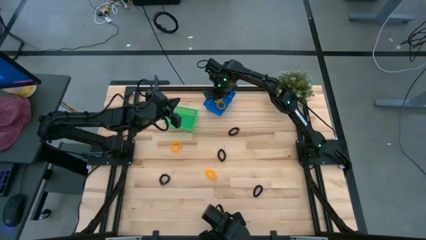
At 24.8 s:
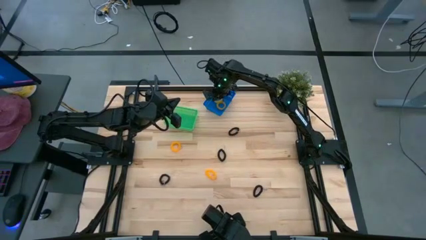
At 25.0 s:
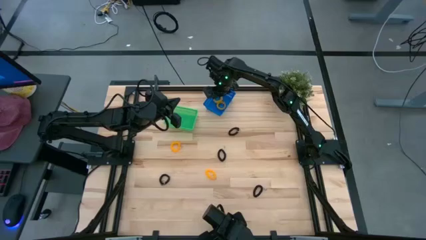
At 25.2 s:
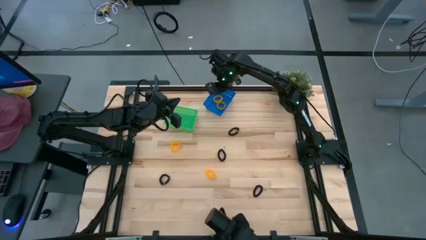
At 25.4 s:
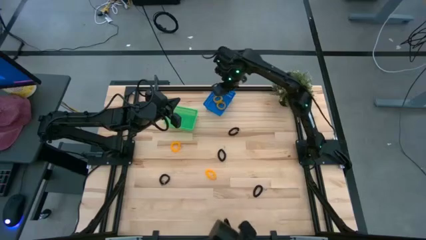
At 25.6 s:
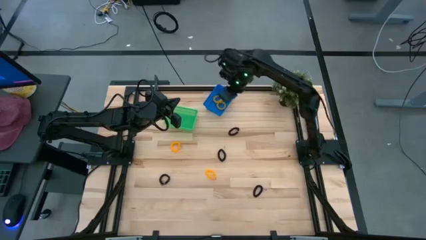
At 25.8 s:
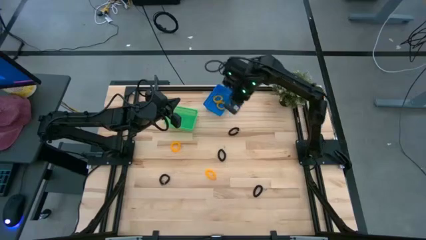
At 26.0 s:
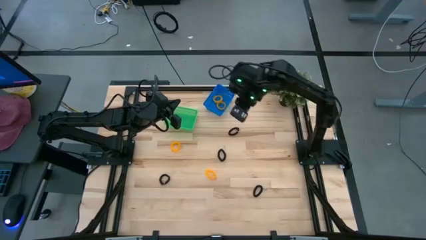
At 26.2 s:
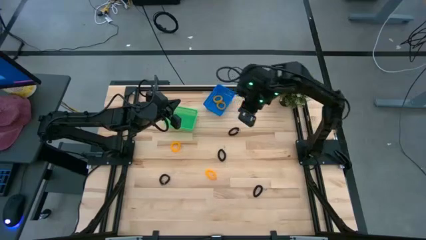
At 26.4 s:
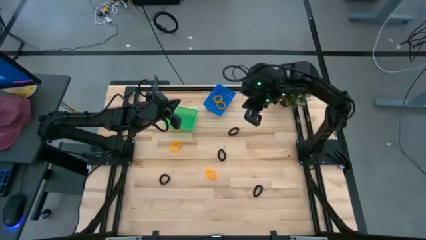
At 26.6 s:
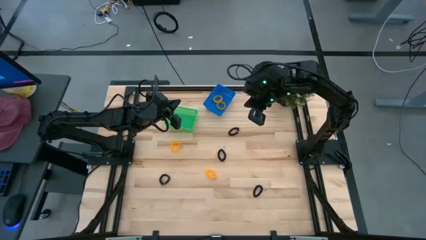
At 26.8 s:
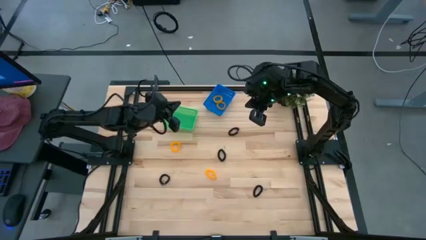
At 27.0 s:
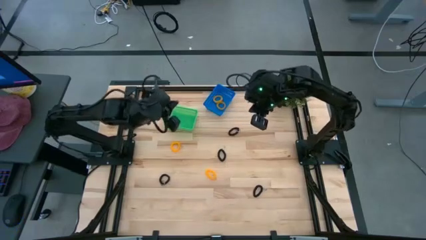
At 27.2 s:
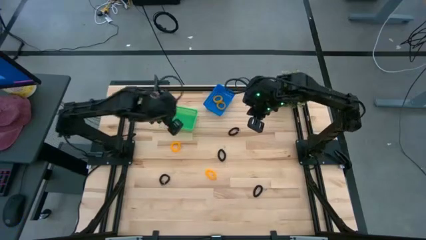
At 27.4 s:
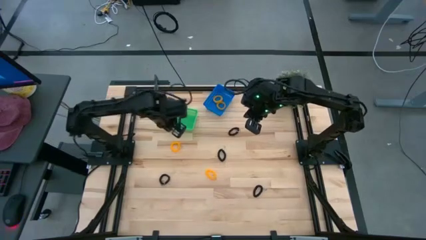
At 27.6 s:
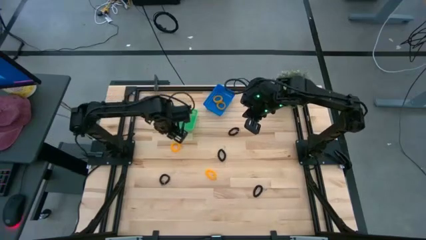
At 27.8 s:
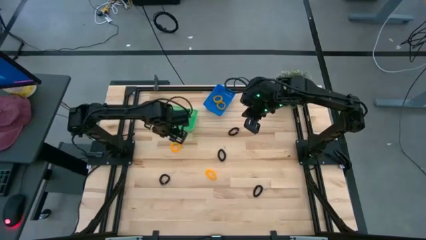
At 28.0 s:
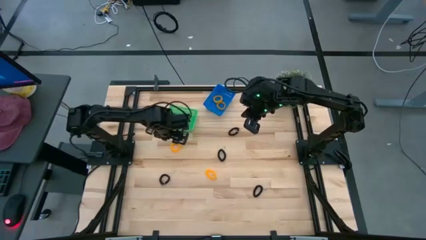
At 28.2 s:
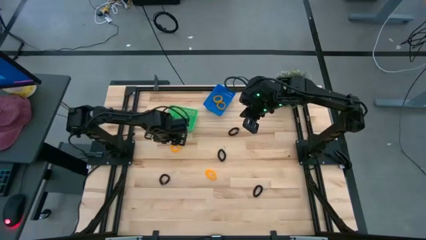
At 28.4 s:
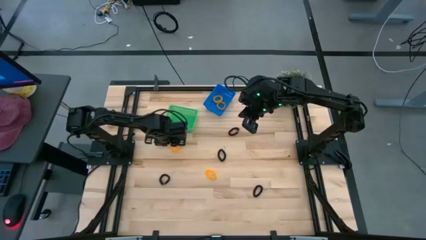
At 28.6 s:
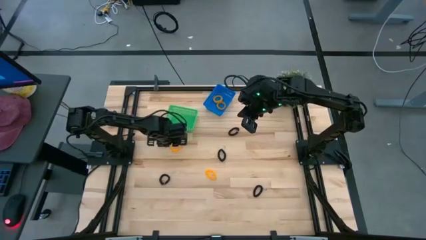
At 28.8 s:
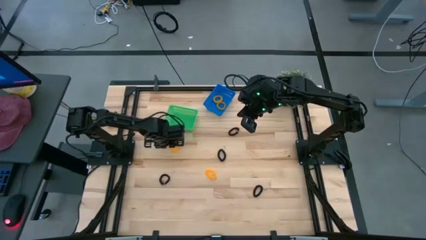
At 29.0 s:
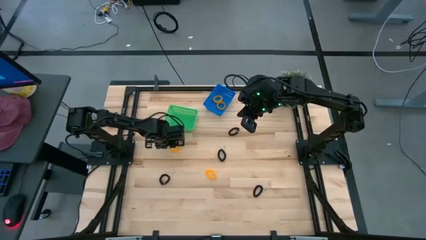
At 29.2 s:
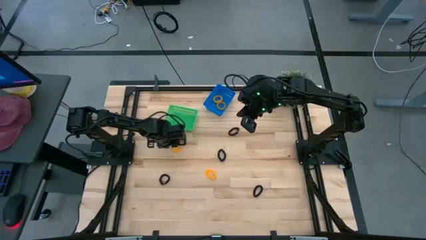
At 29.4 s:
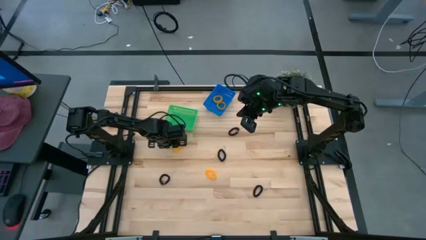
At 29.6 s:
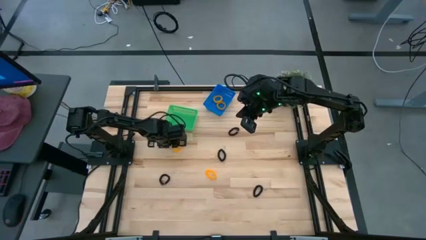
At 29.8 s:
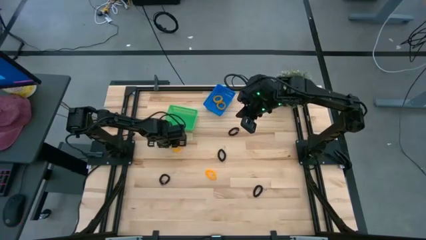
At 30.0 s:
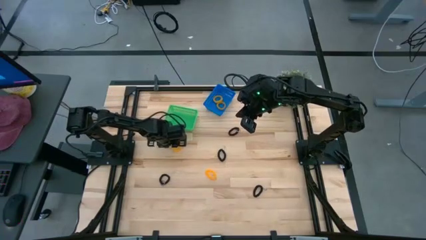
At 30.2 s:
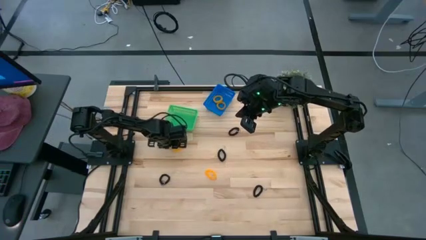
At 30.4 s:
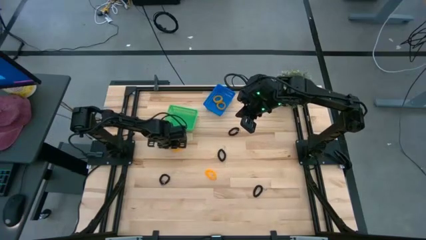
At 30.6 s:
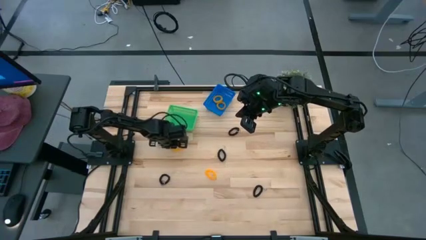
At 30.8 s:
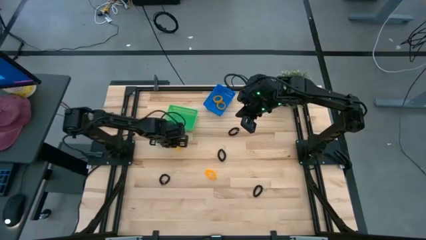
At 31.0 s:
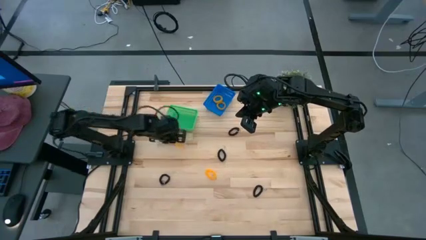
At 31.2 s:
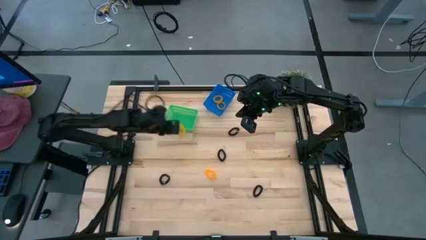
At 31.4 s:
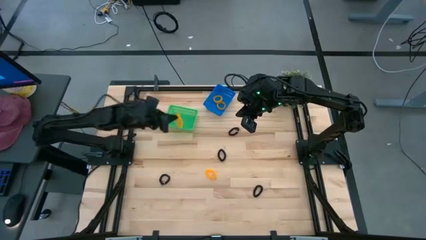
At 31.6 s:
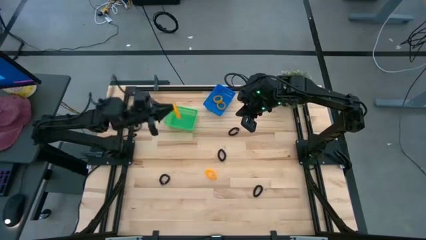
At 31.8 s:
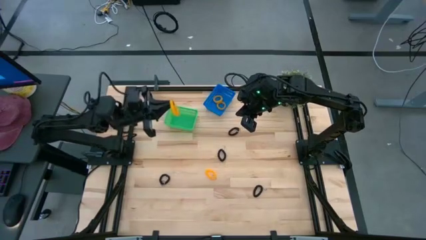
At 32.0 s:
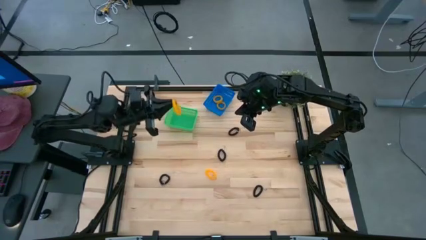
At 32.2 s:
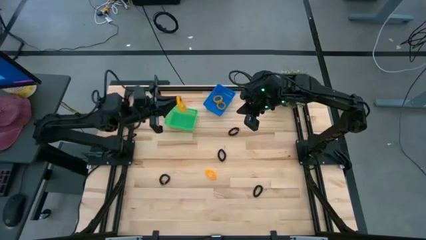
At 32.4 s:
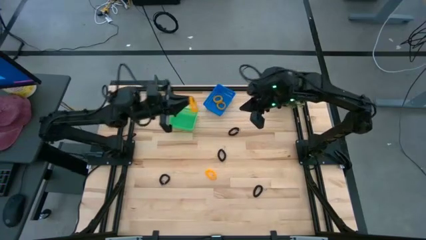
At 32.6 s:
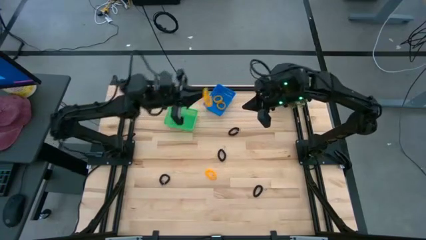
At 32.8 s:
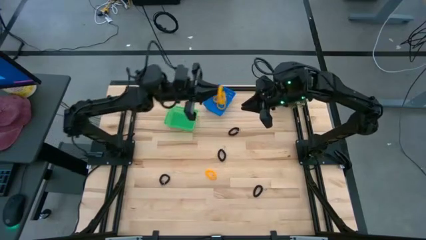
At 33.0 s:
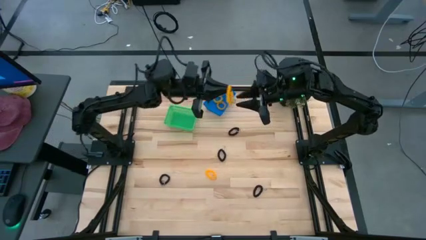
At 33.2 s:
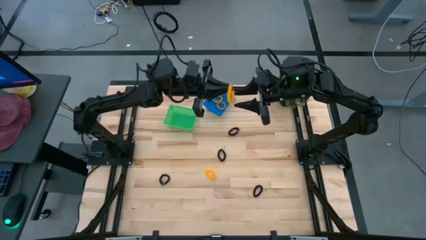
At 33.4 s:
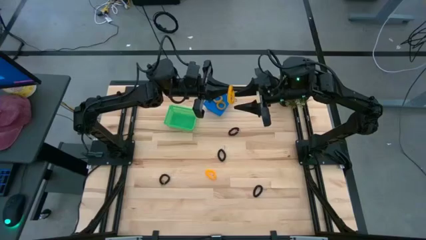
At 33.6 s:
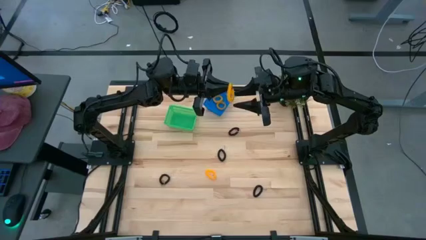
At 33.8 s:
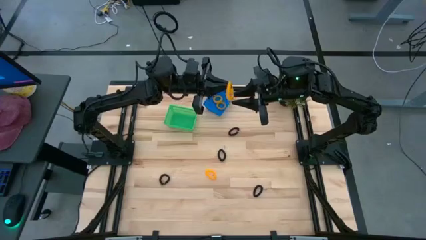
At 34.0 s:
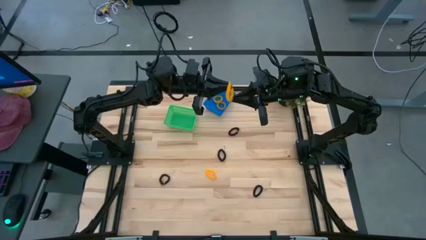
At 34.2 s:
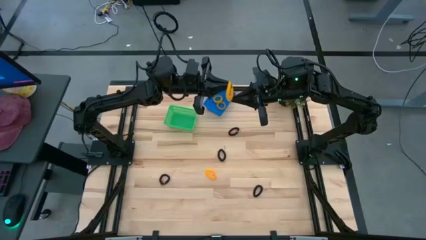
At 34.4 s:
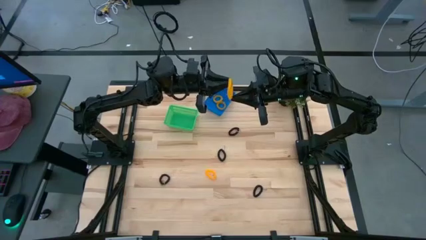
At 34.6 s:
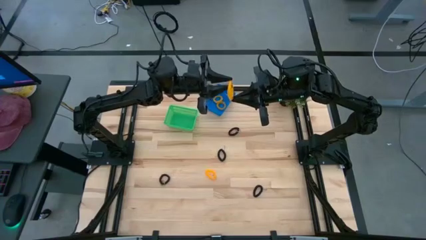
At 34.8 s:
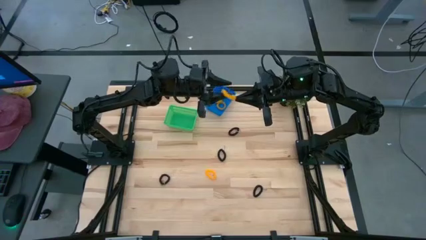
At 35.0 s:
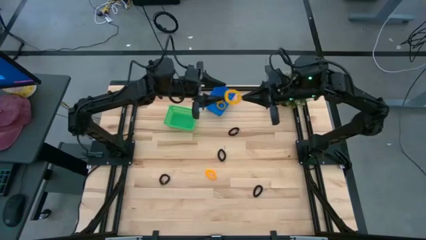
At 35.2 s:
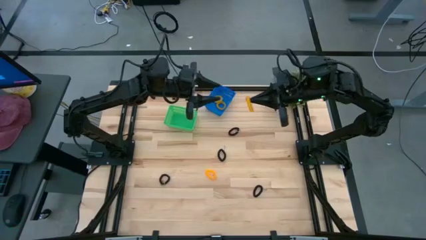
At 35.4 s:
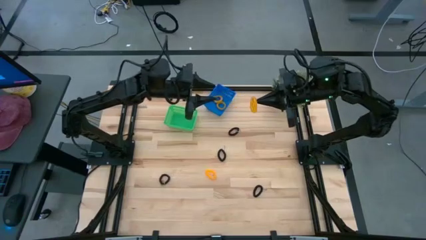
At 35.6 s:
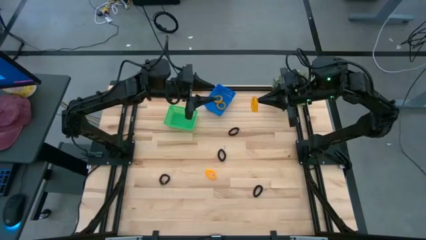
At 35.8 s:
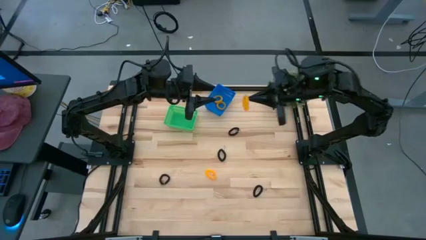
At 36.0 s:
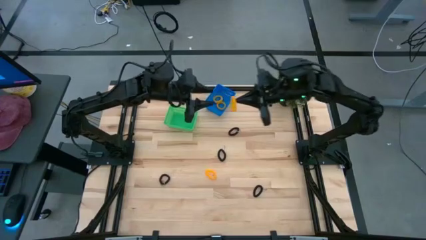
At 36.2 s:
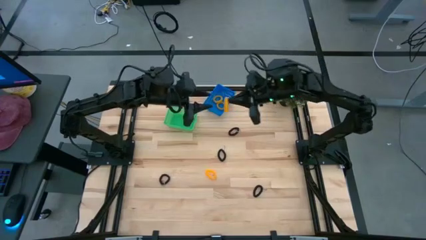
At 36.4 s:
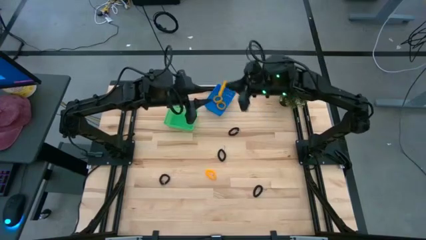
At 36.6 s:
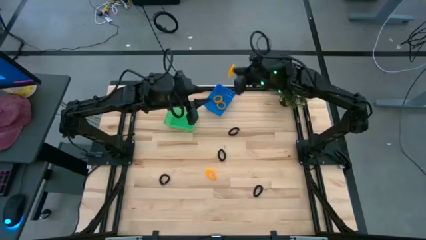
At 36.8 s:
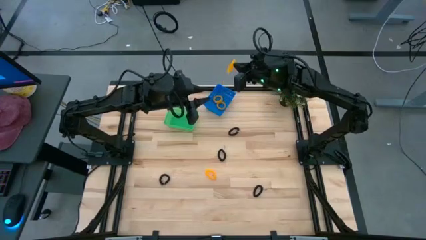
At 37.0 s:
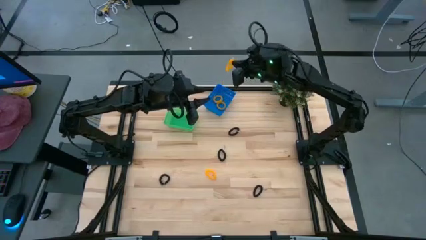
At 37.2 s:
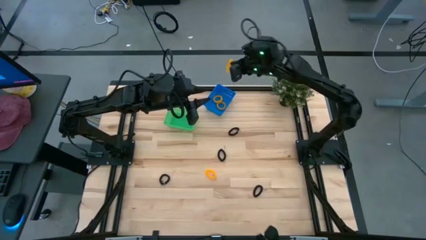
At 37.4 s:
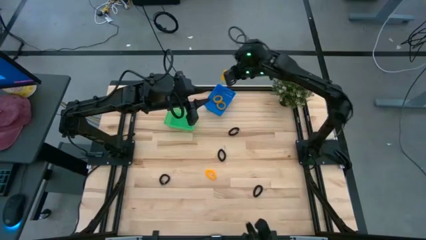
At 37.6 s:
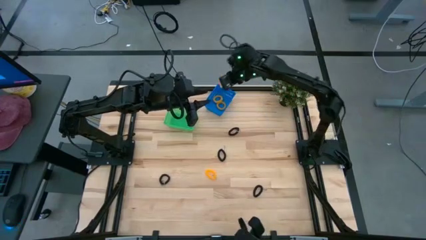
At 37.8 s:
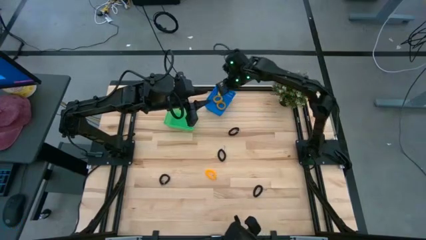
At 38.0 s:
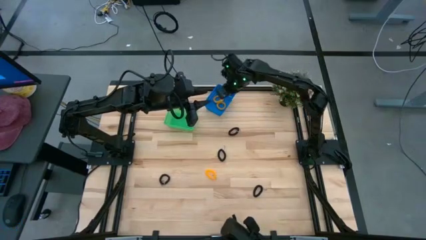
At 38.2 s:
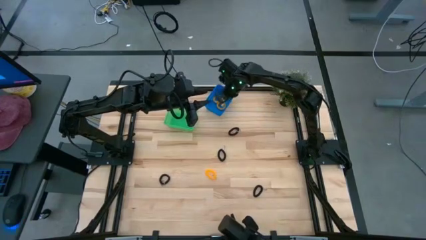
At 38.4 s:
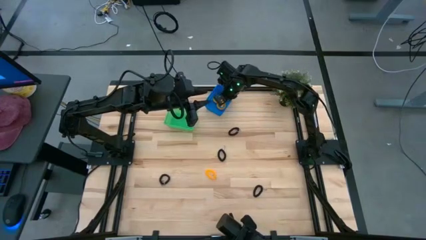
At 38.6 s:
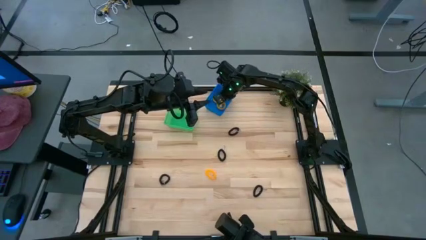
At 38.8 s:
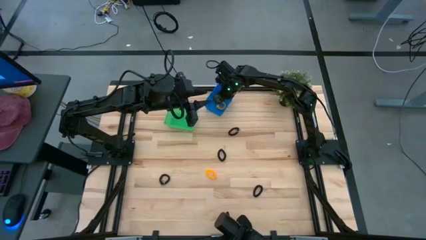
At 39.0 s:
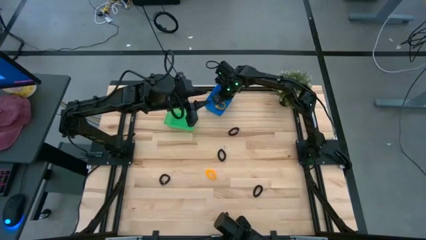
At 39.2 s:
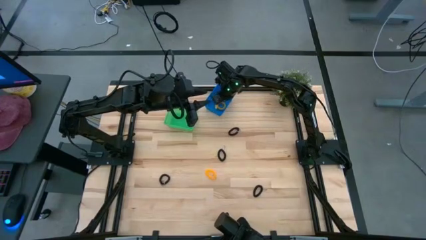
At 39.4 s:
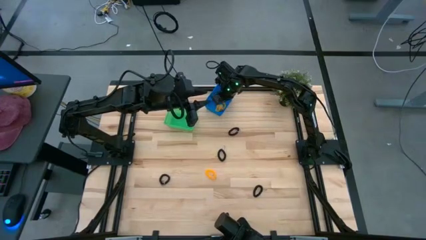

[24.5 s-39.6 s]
Task: Sort spring keychains into baskets
Put the yellow spring keychain into the blue basket
